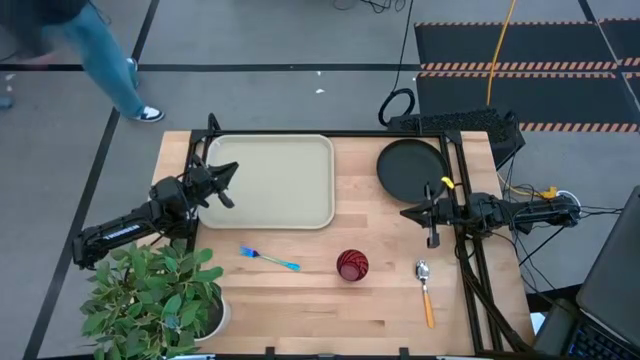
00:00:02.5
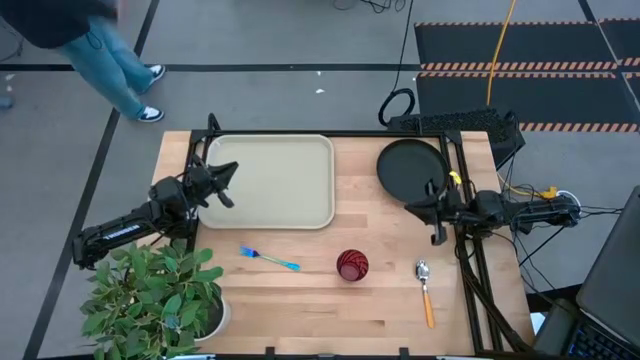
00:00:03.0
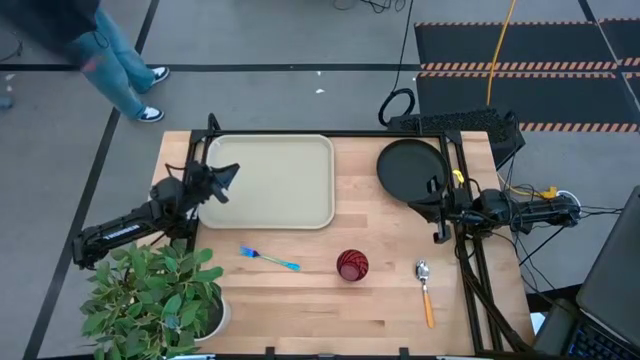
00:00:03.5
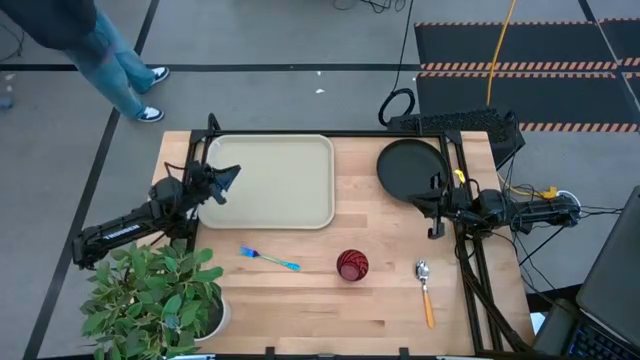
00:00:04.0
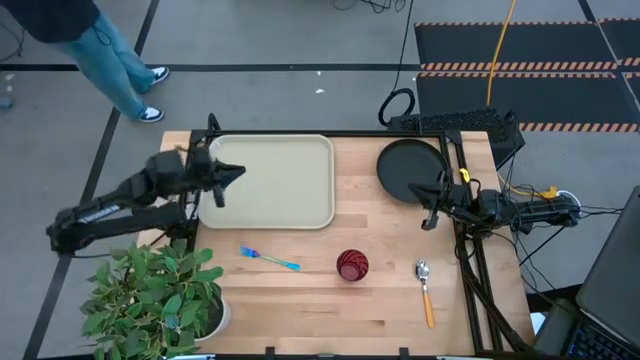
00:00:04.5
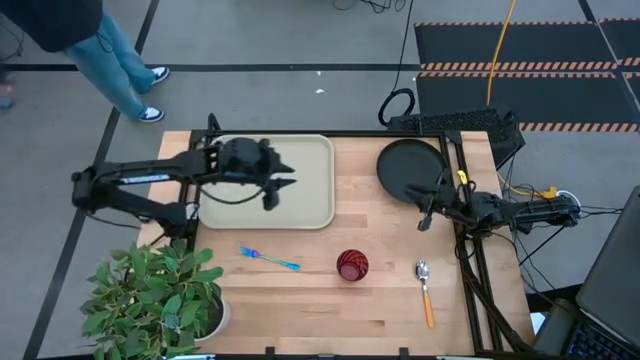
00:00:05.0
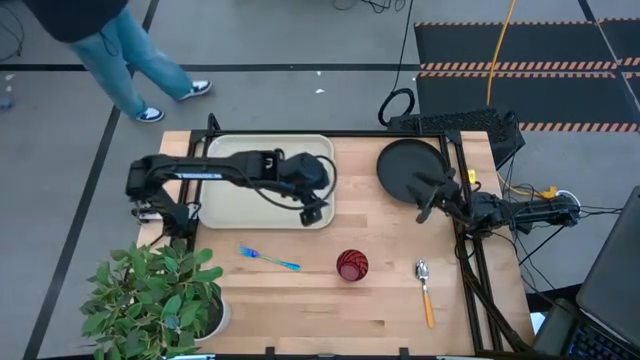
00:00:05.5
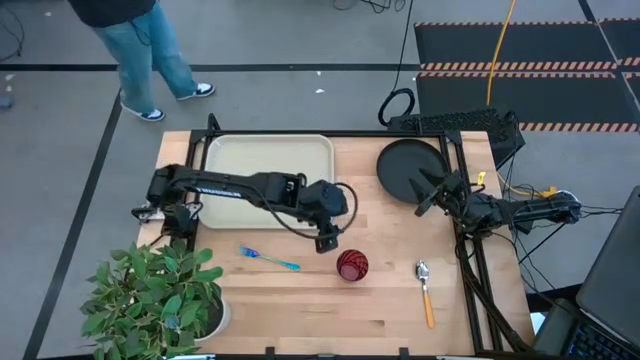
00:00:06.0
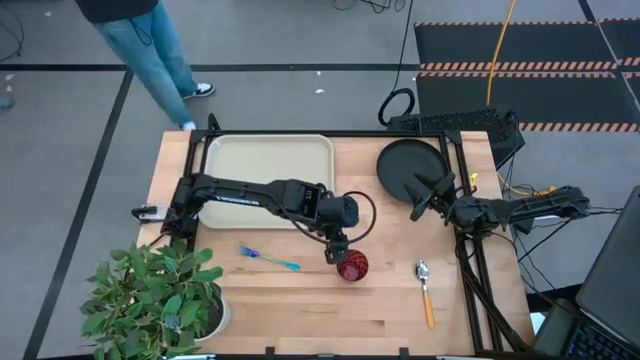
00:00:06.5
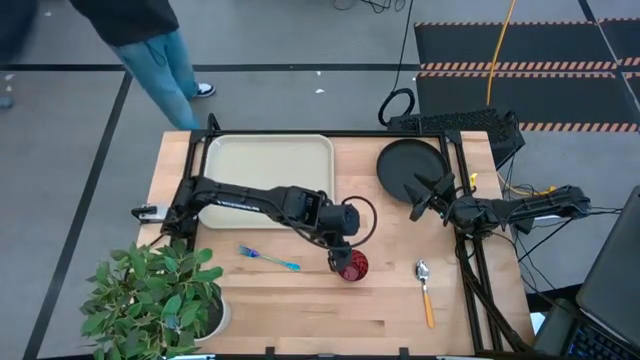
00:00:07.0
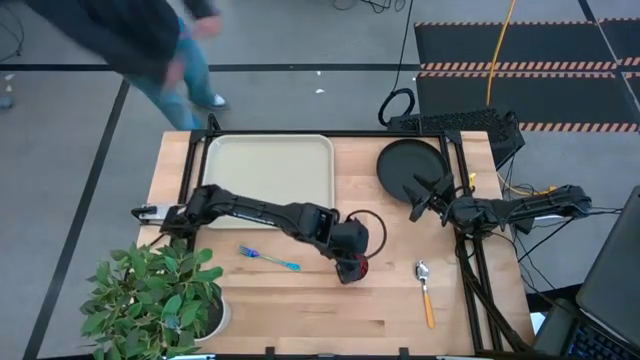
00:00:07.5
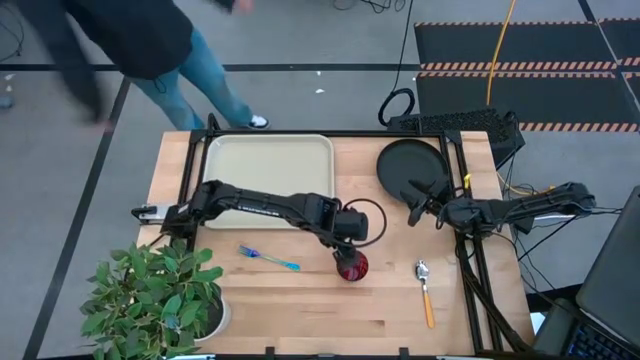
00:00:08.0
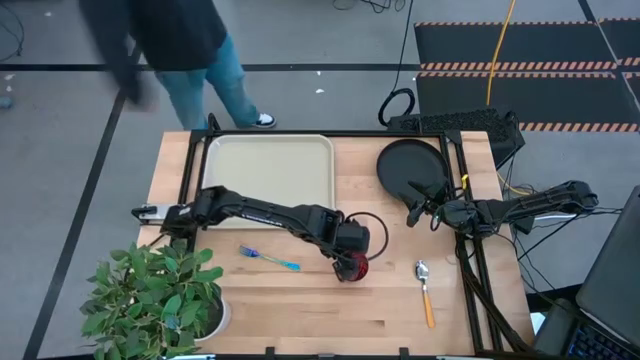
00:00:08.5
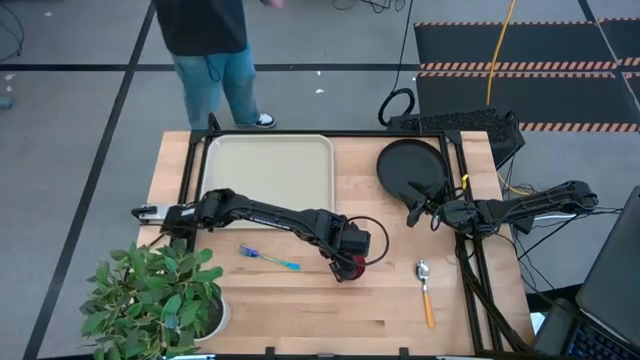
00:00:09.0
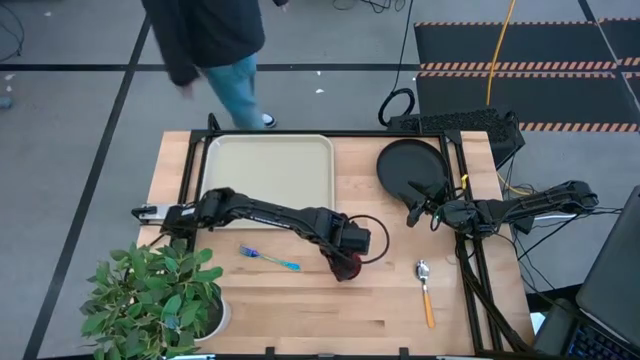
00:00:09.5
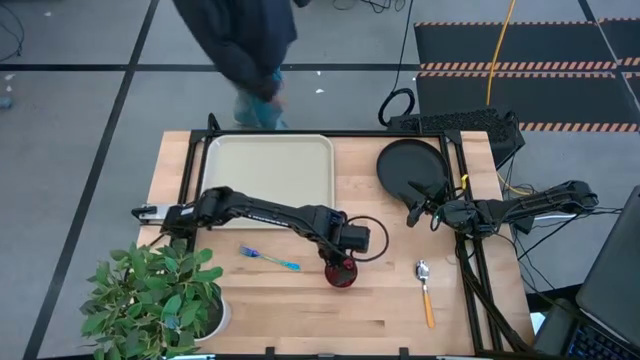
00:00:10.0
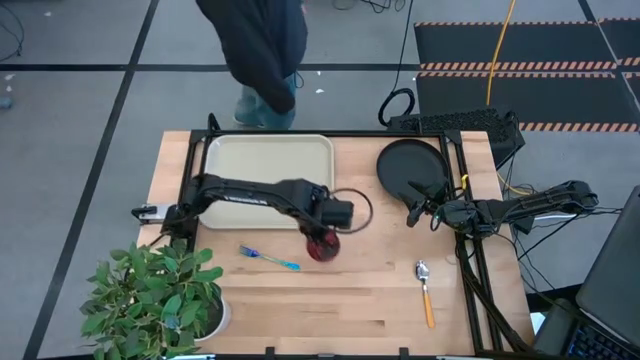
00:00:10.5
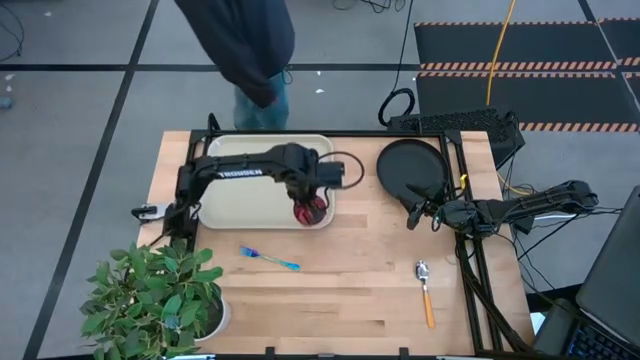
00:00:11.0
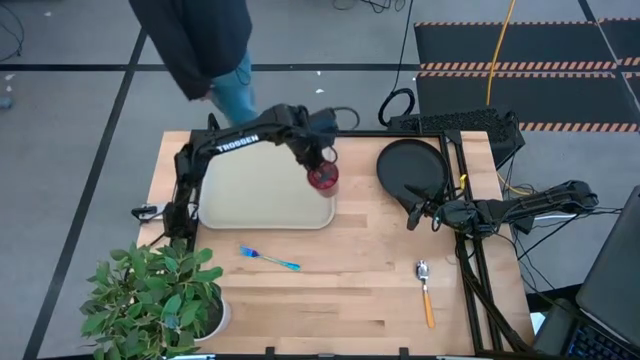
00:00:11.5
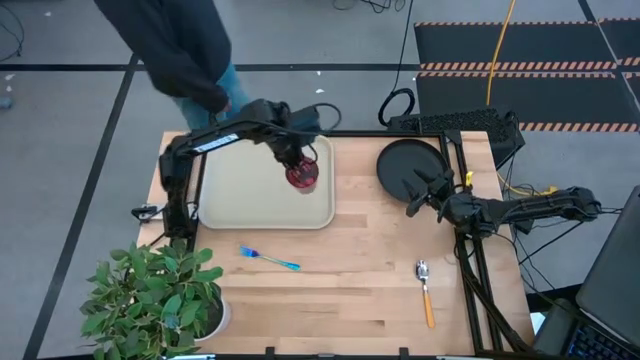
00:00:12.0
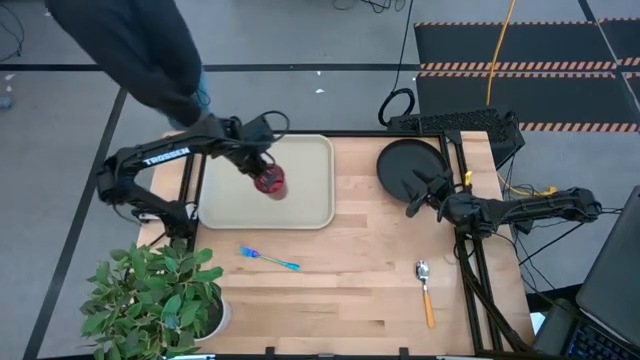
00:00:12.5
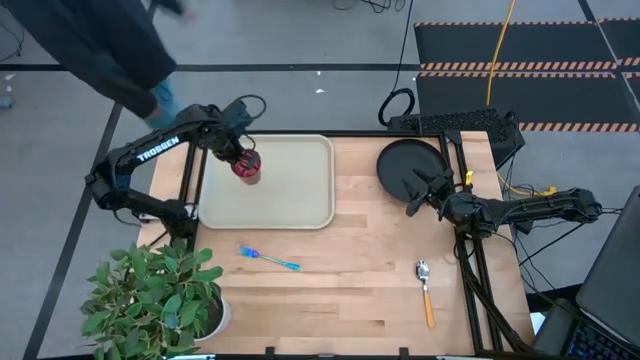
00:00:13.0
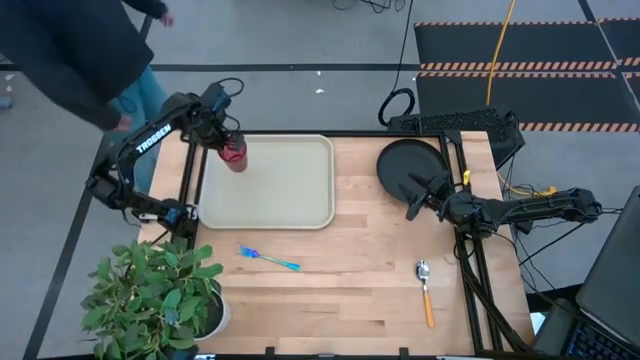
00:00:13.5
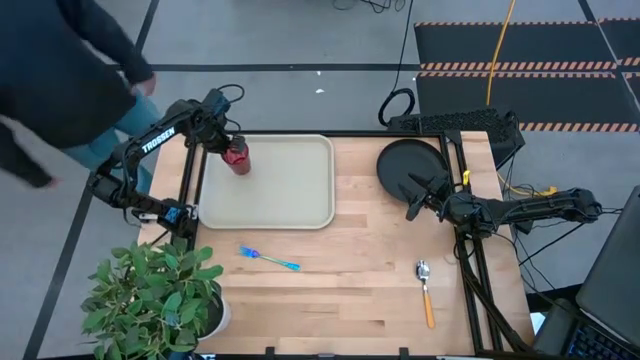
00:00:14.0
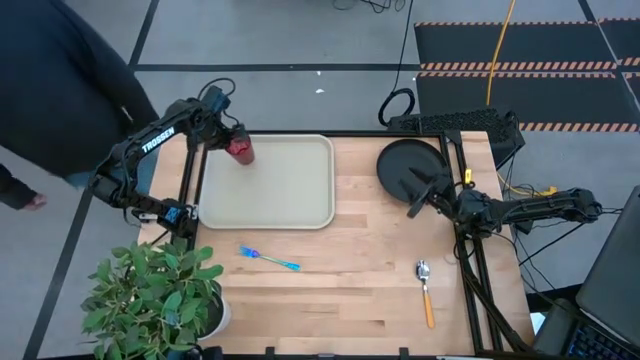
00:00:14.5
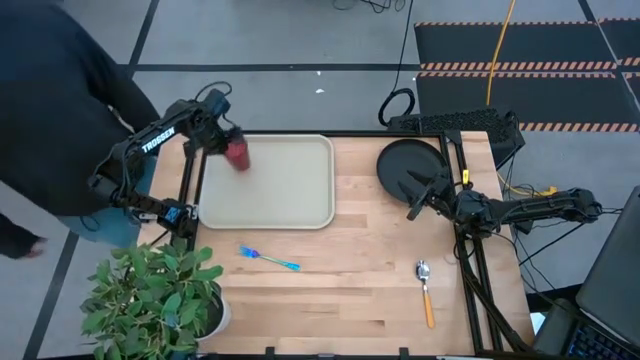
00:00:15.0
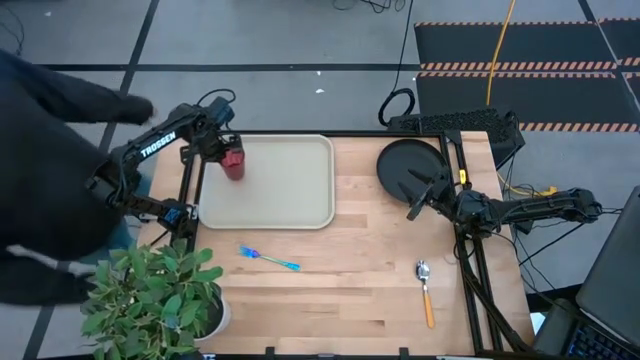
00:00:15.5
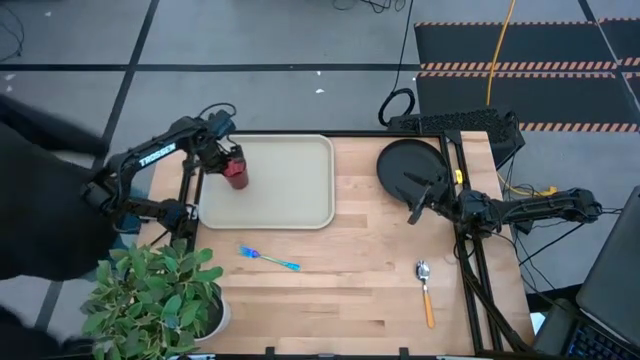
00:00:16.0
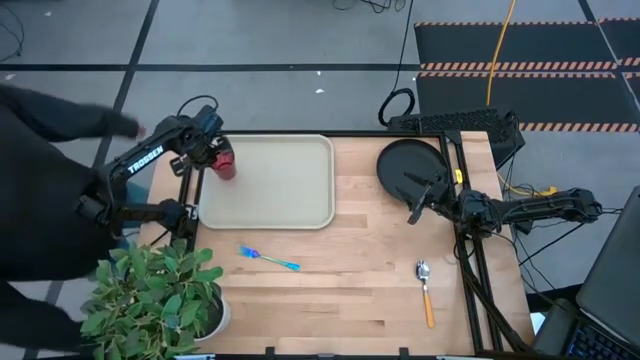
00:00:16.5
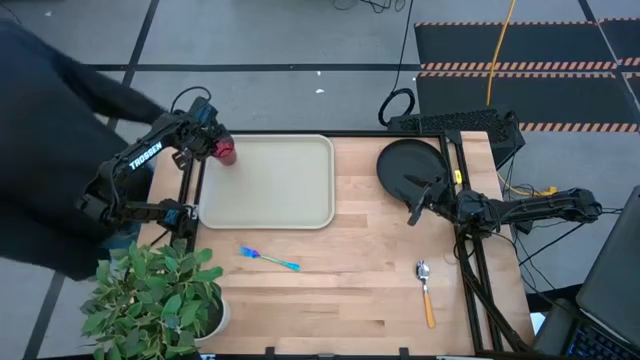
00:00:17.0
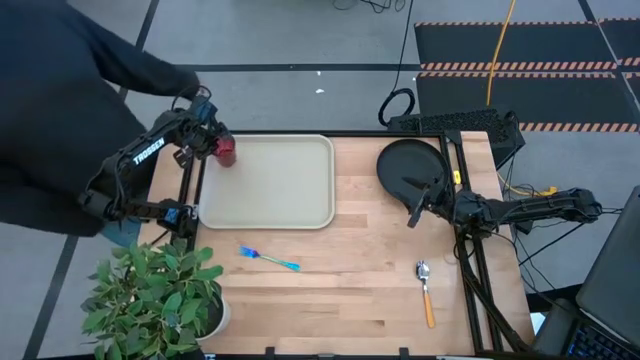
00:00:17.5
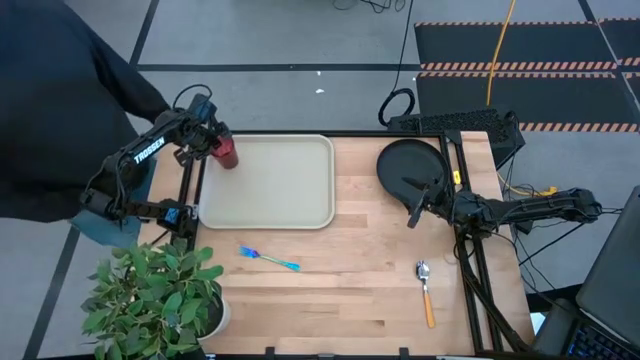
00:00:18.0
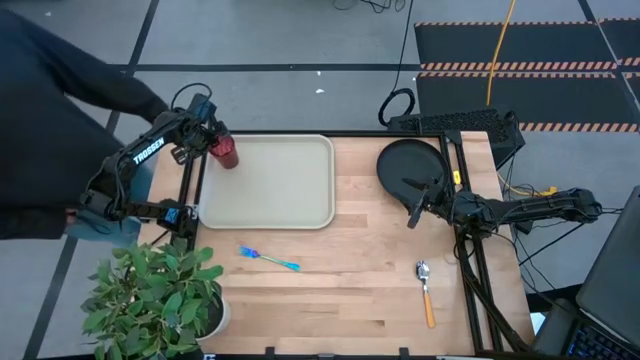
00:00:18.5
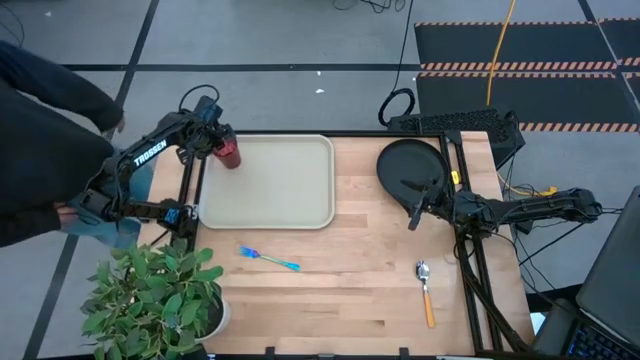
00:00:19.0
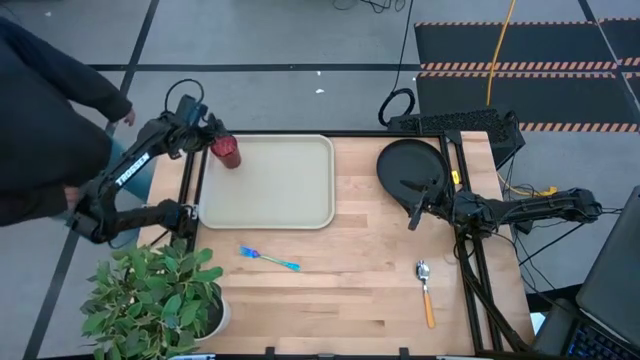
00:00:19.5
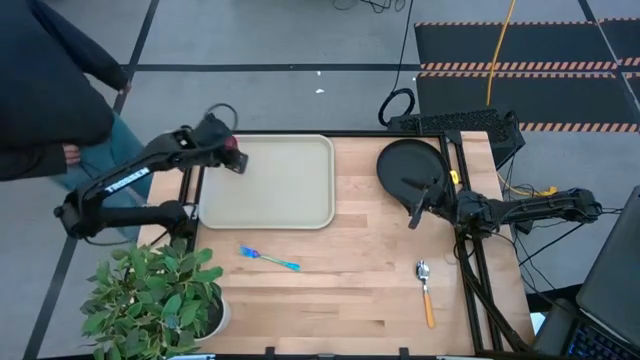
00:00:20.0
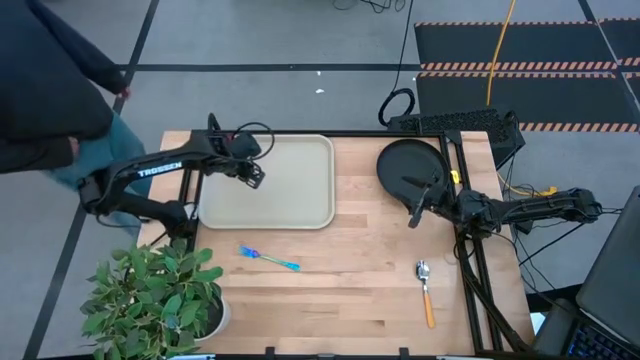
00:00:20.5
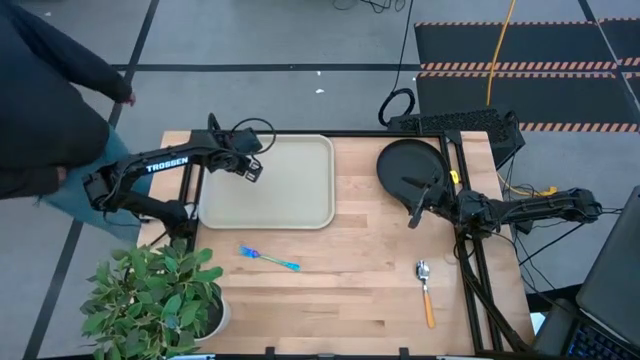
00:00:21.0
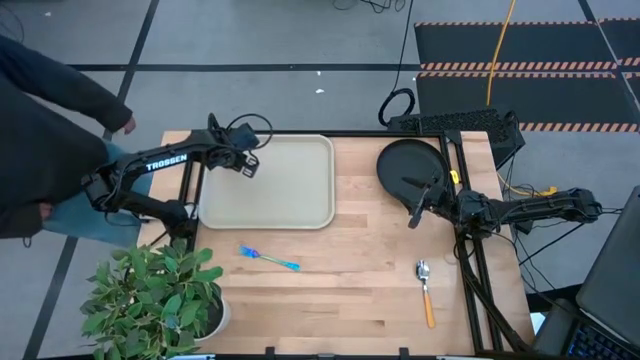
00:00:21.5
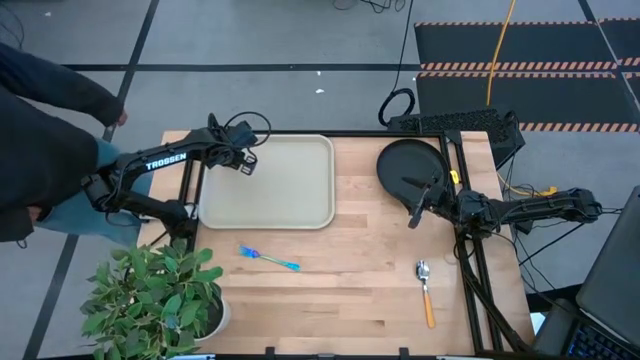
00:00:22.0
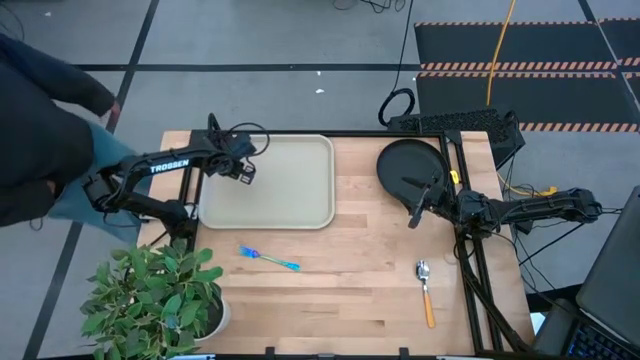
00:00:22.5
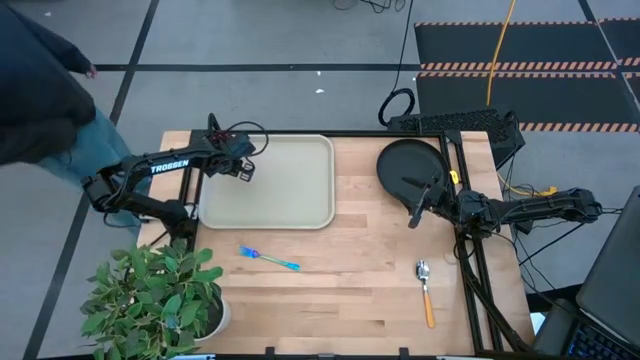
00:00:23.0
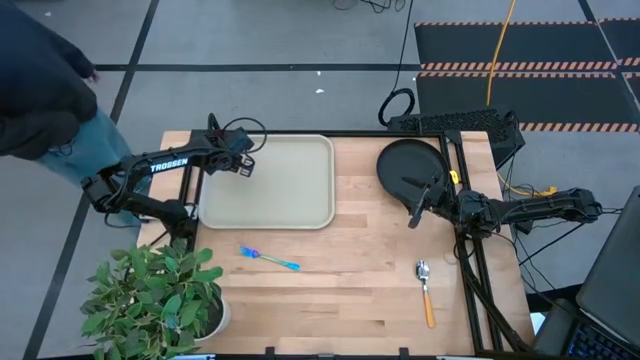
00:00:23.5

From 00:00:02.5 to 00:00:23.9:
Task: Pick and place plate/cup/fork/spoon on tray
Put the red cup on the top left of the gray tray
